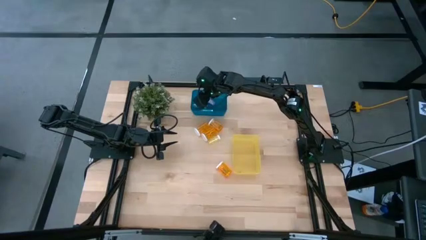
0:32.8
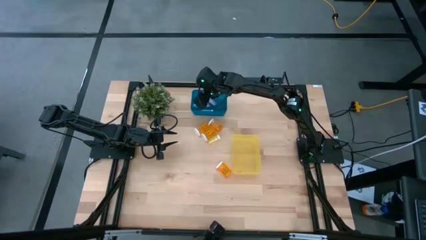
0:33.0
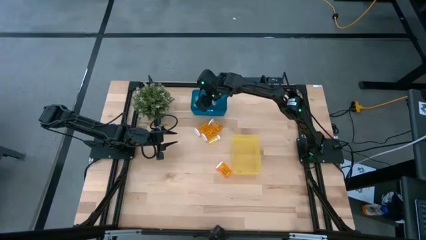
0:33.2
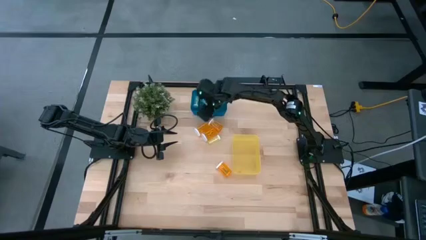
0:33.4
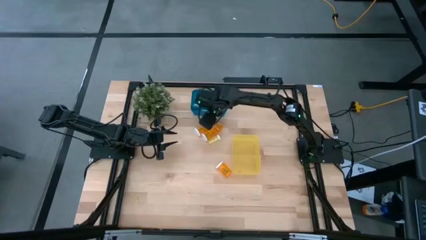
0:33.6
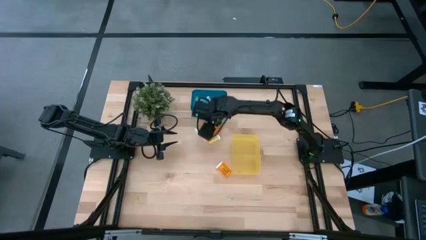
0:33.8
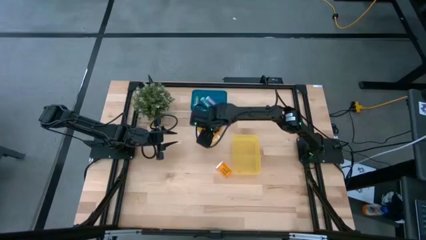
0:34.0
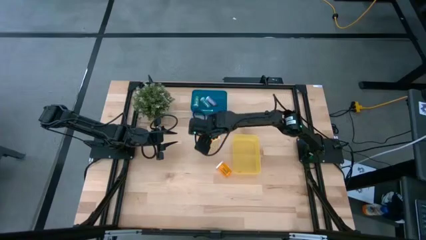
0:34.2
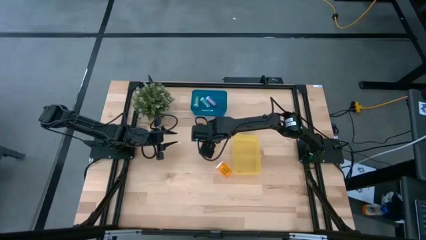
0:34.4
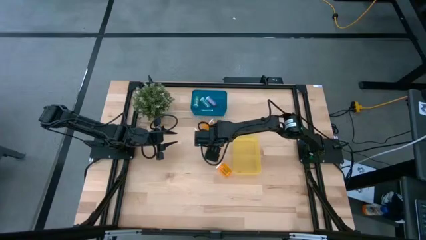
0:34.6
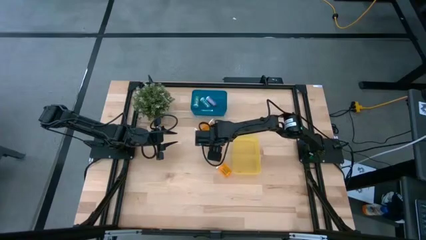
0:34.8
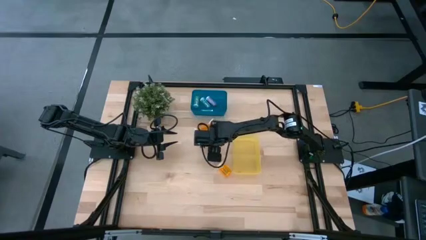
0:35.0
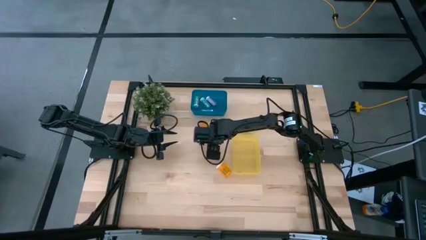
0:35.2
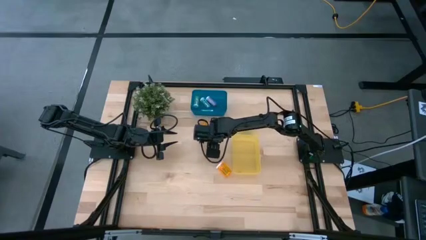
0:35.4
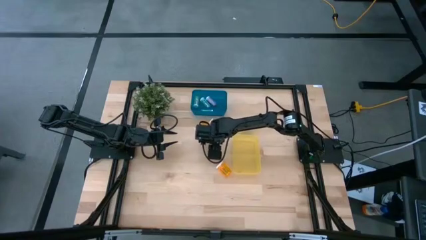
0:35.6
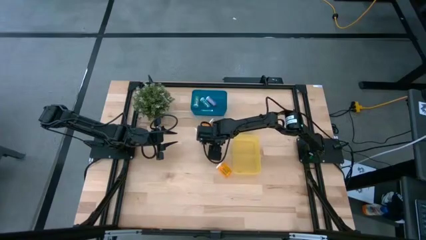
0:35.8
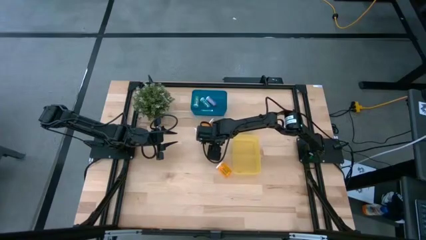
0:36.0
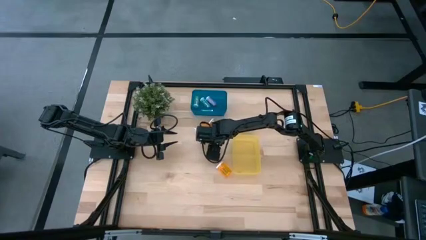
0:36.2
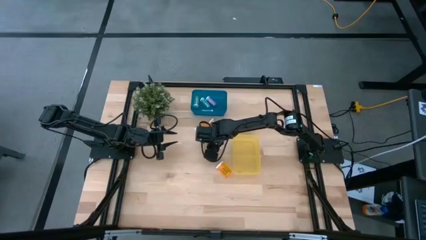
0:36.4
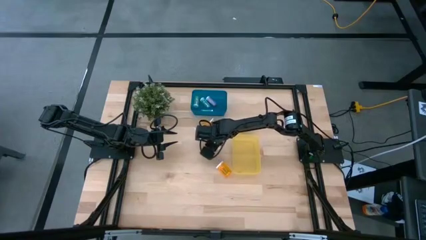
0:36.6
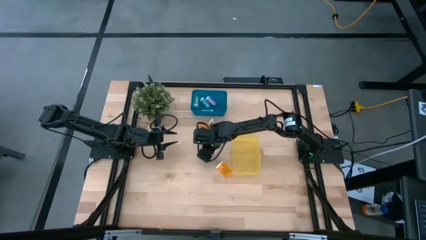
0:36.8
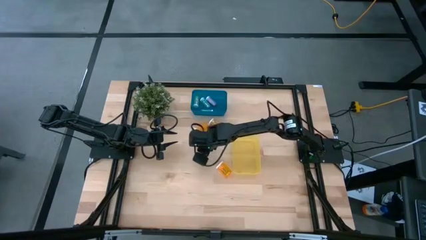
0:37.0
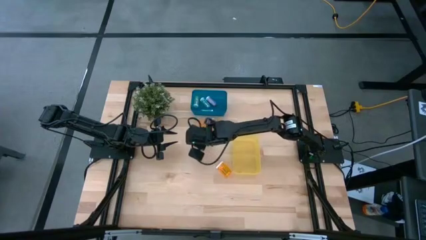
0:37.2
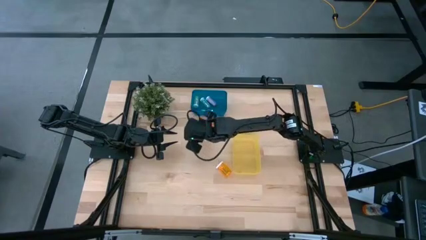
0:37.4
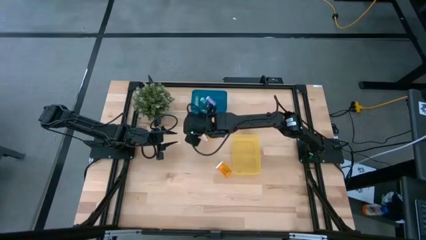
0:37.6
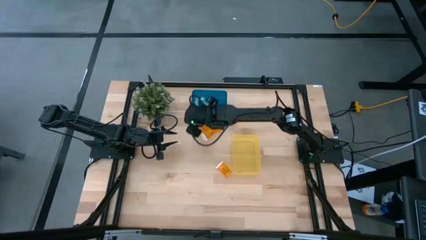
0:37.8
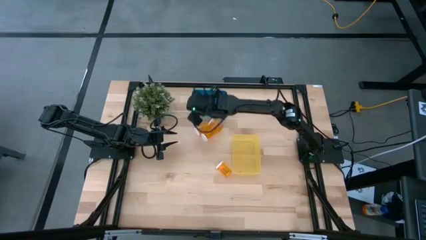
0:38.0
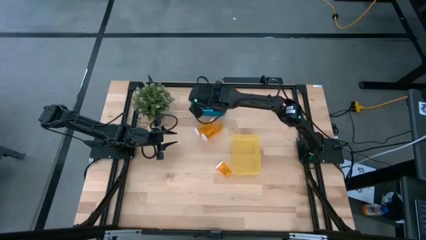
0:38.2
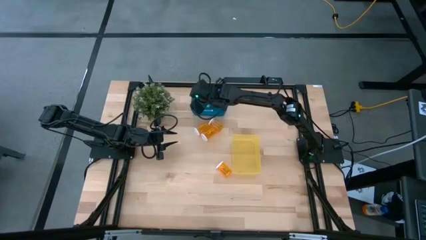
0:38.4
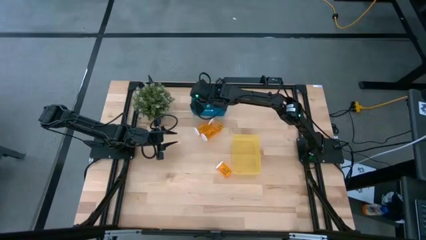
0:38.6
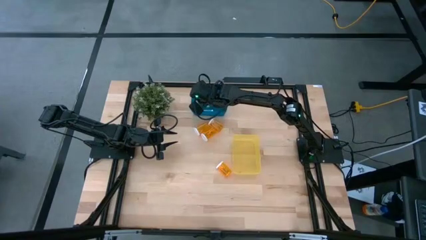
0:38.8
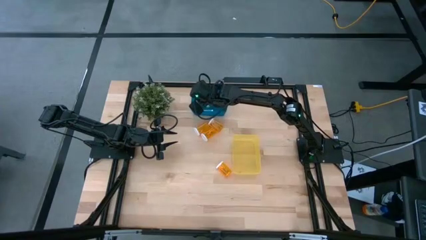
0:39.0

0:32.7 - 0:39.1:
Task: Pick and place medicine bottles into bin by pill shape (circle, oval)
Put the small yellow pill bottle into the blue bin

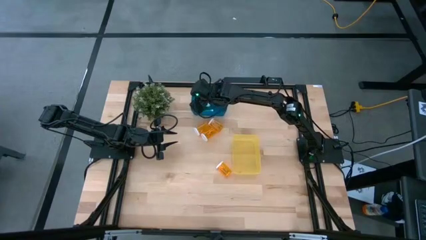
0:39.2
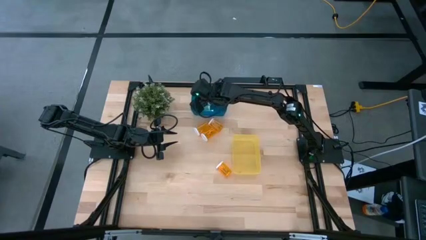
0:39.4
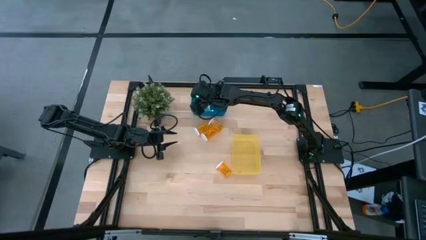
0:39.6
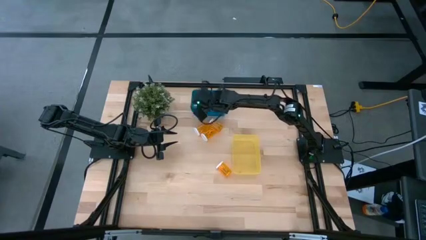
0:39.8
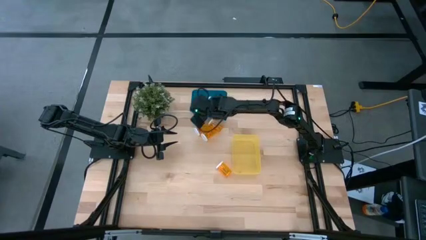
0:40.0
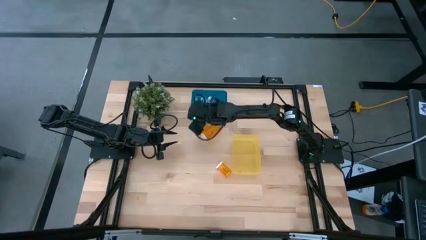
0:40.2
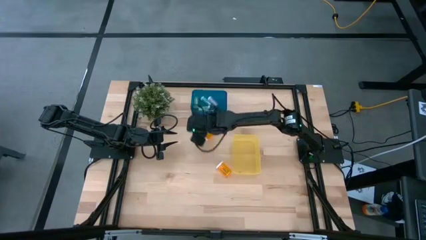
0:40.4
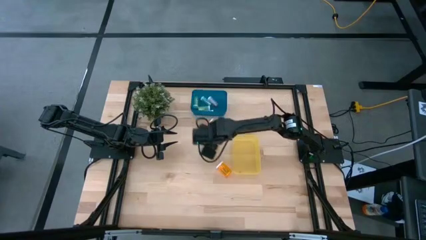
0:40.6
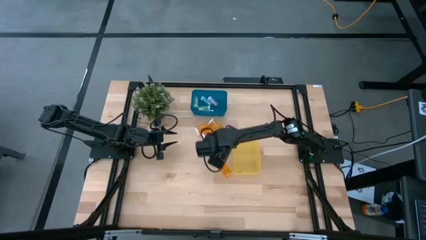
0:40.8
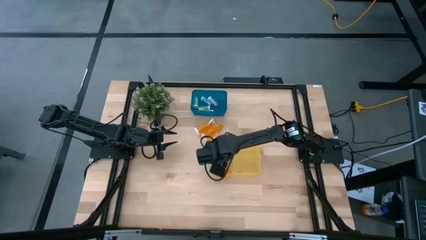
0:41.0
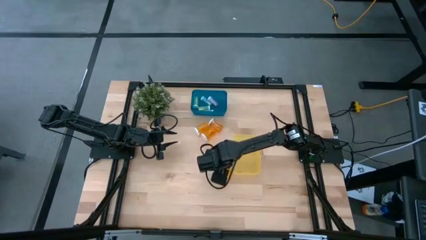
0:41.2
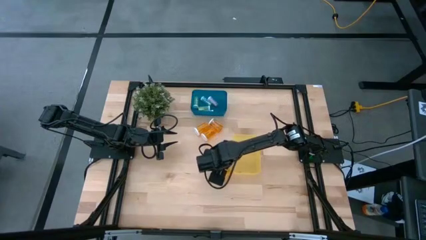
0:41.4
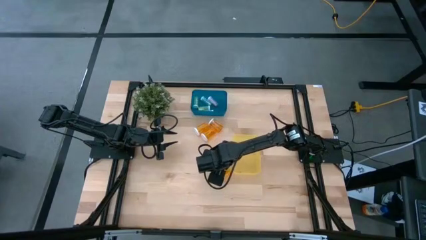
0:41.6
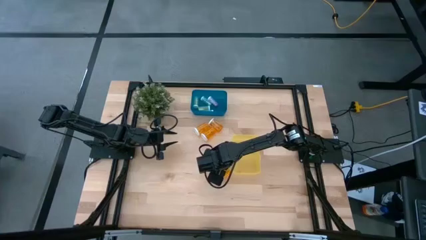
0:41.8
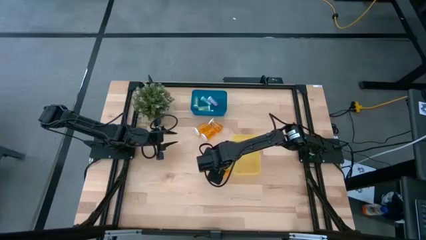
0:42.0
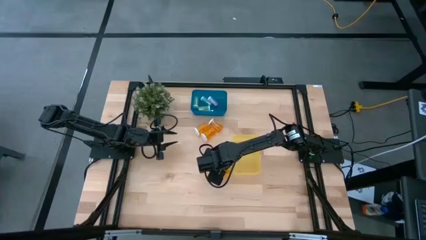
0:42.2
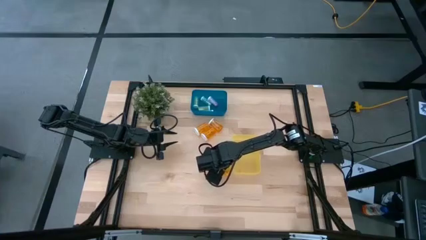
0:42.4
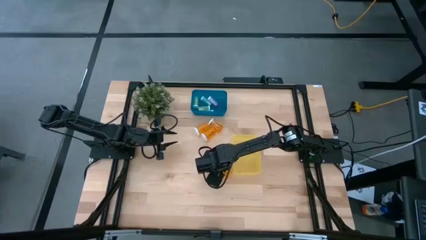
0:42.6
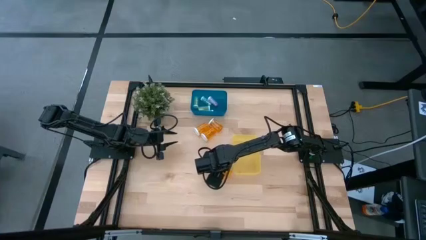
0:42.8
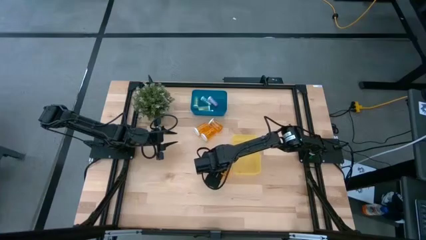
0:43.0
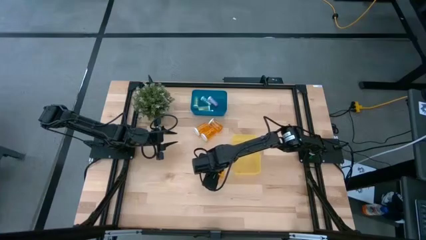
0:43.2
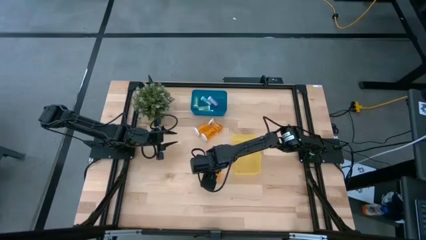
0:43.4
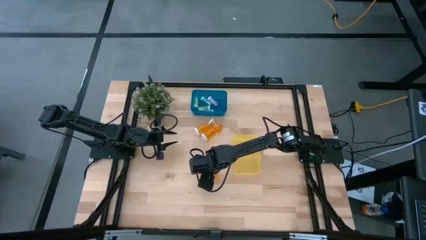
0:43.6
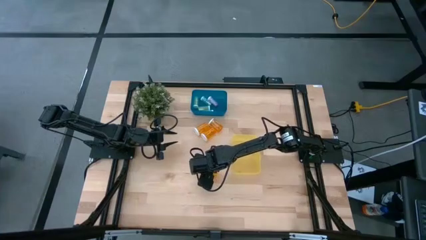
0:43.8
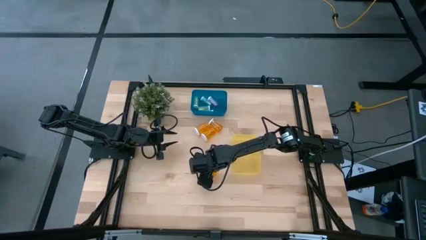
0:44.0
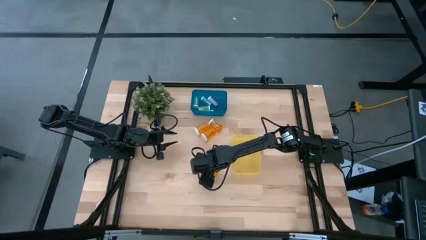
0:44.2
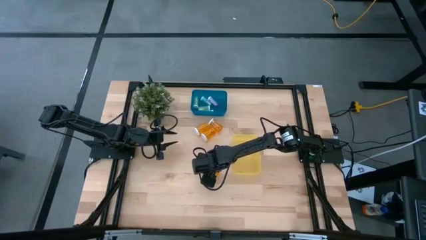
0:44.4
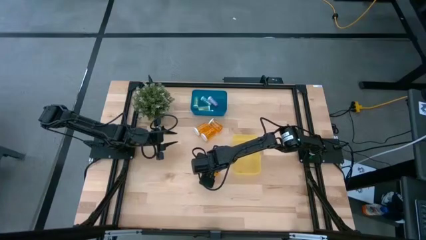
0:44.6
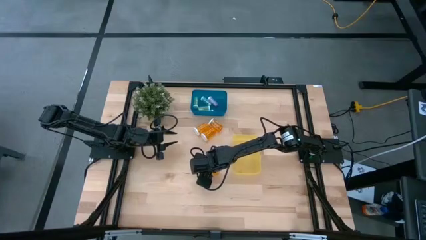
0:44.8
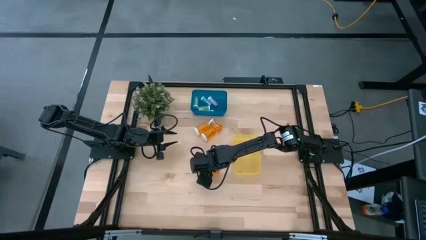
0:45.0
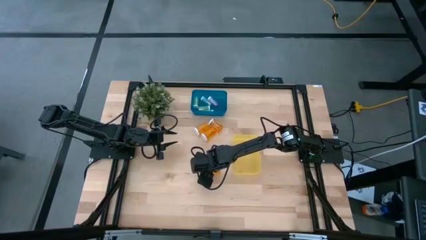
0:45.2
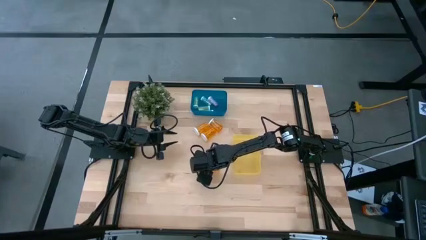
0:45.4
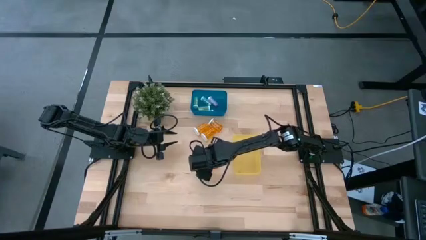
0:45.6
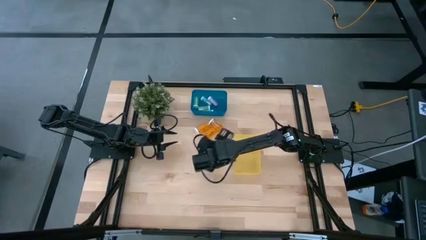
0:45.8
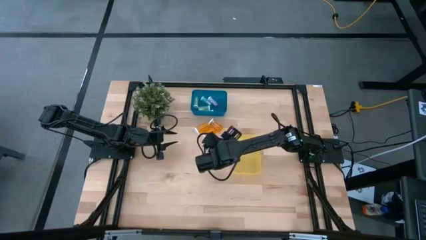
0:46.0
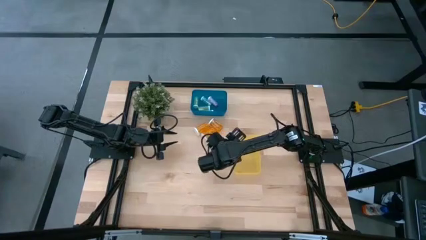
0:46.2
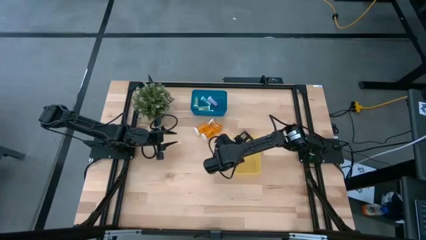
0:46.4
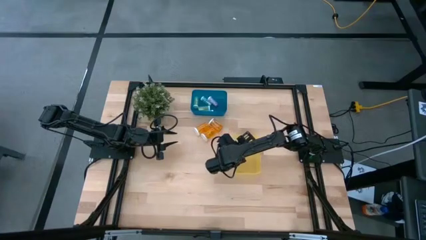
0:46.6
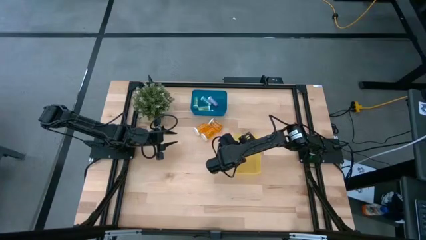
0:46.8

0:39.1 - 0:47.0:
Put the bottom big orange pill bottle into the yellow bin

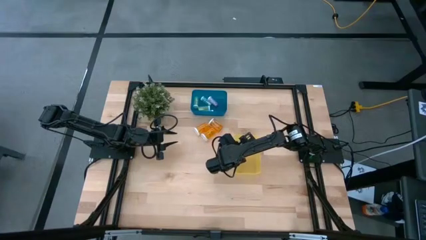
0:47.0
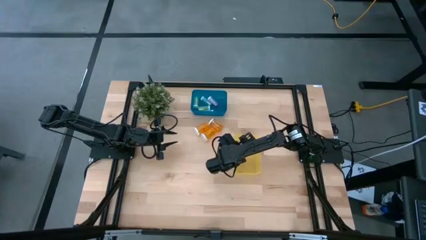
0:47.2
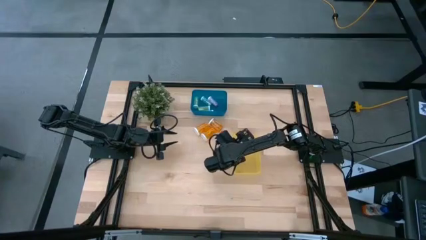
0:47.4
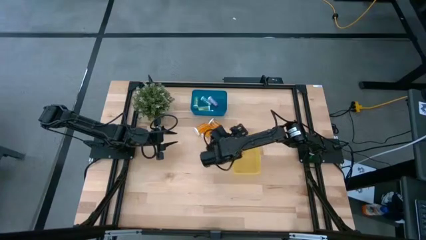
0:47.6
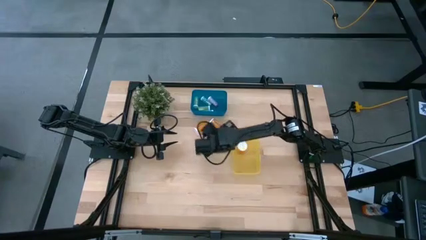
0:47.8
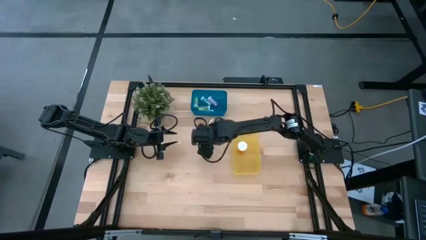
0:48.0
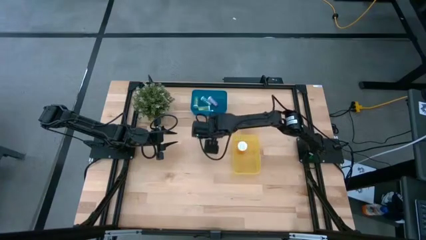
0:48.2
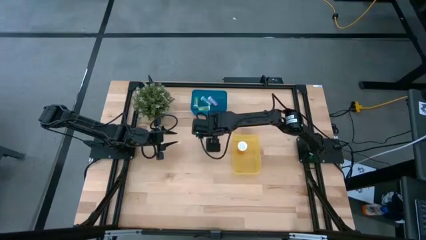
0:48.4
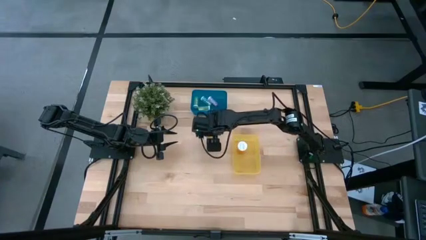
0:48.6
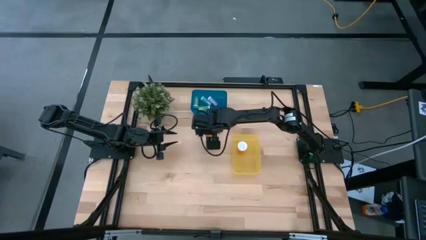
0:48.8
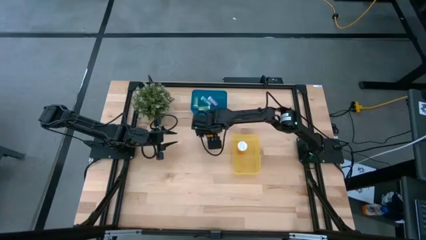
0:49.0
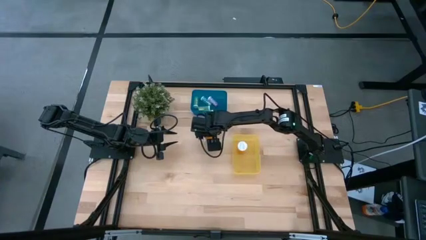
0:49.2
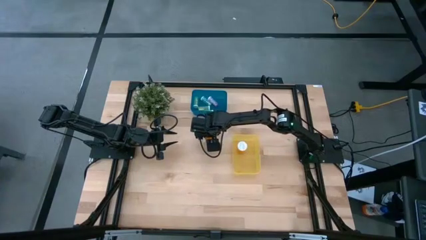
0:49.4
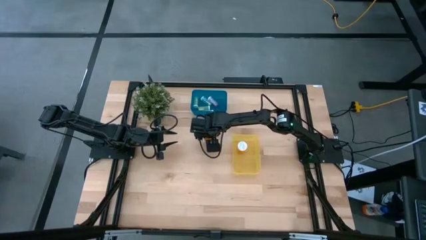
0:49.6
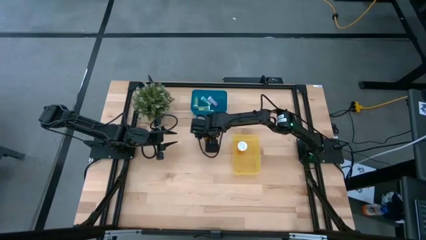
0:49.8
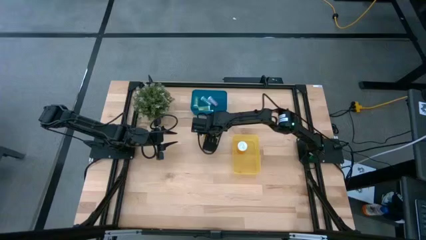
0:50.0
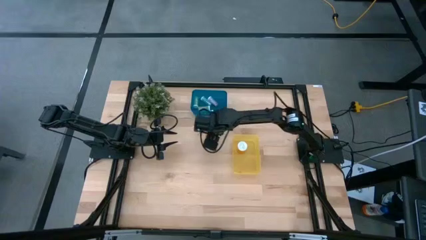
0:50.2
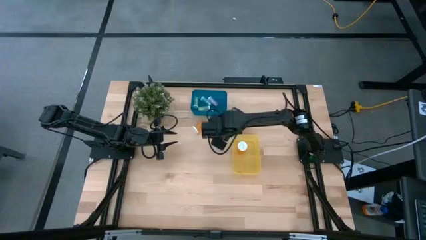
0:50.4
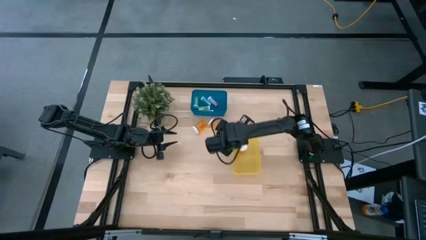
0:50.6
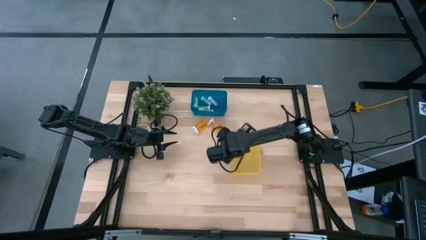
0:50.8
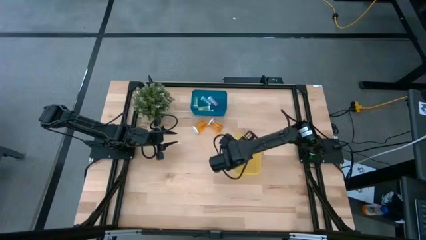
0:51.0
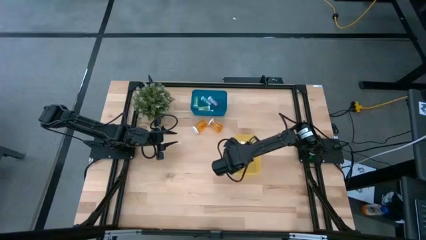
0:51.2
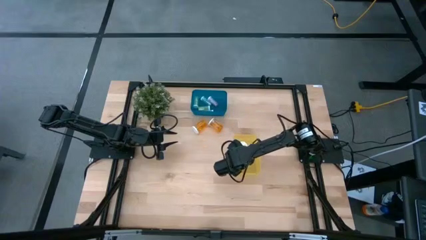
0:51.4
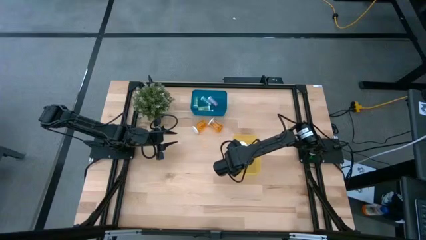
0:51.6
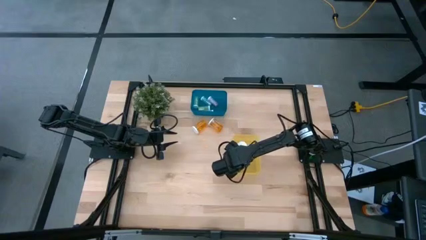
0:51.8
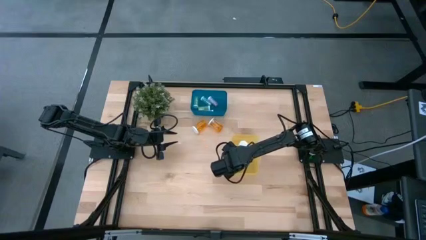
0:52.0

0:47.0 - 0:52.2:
Put the left orange pill bottle into the yellow bin
